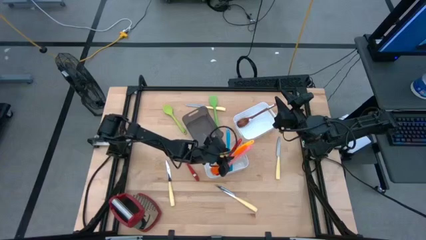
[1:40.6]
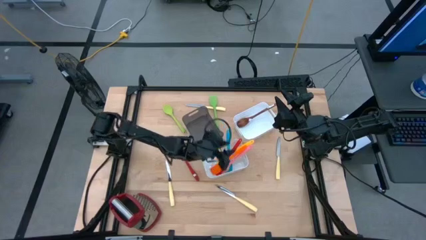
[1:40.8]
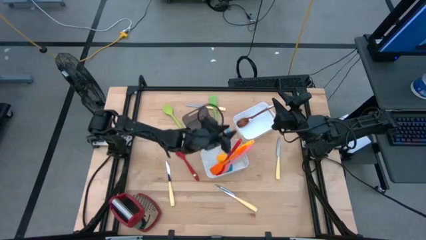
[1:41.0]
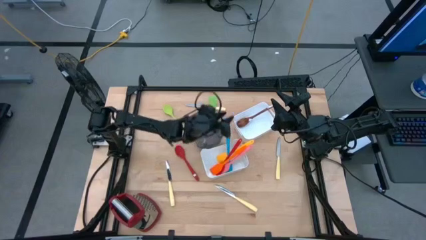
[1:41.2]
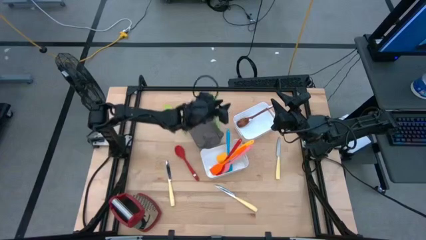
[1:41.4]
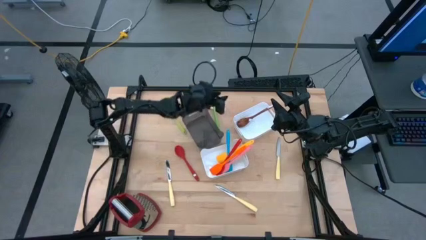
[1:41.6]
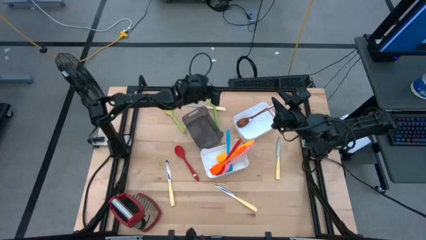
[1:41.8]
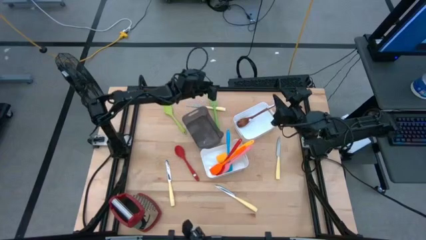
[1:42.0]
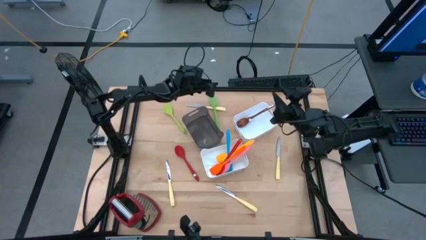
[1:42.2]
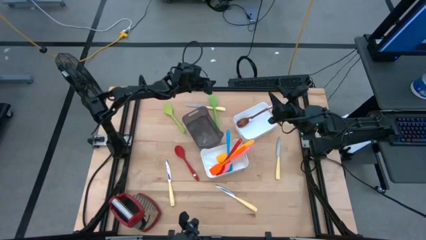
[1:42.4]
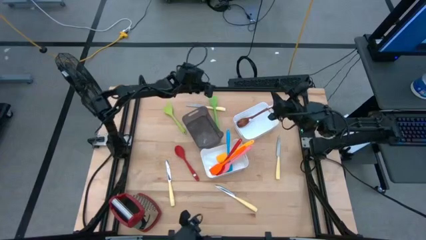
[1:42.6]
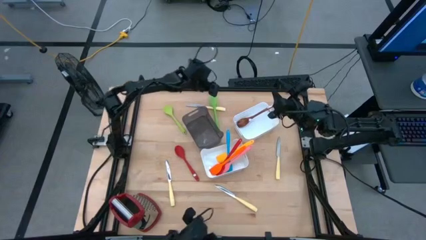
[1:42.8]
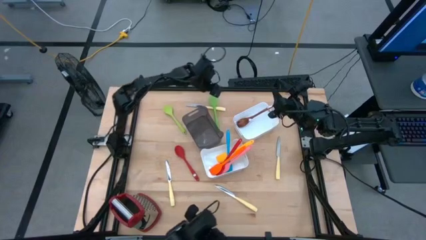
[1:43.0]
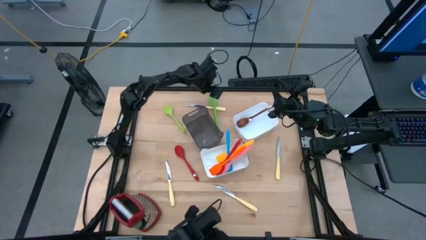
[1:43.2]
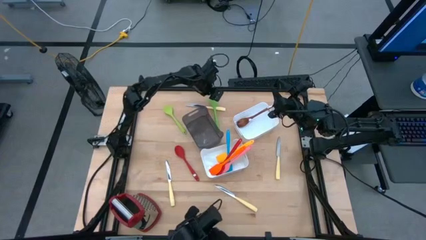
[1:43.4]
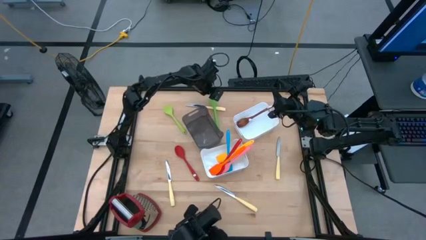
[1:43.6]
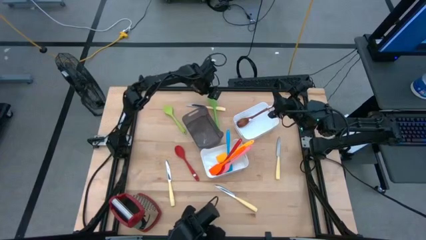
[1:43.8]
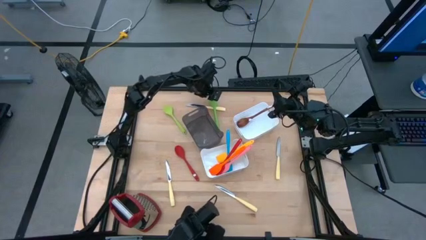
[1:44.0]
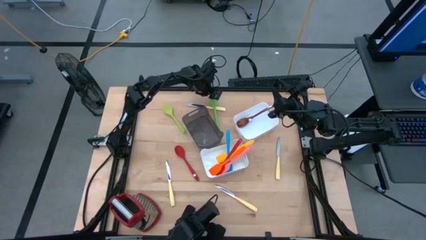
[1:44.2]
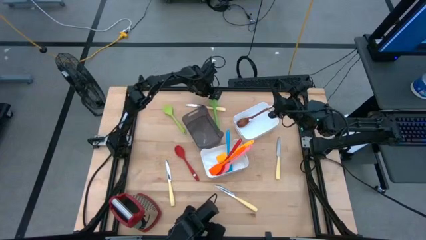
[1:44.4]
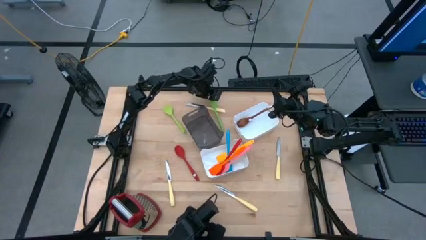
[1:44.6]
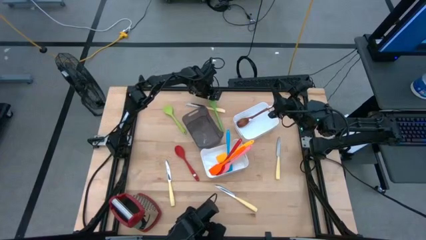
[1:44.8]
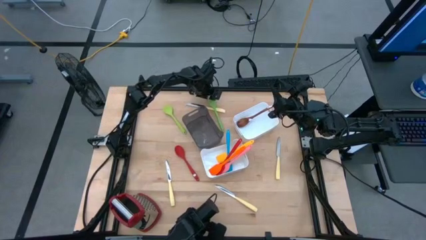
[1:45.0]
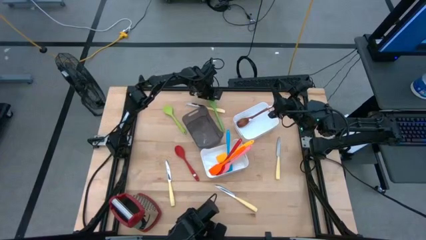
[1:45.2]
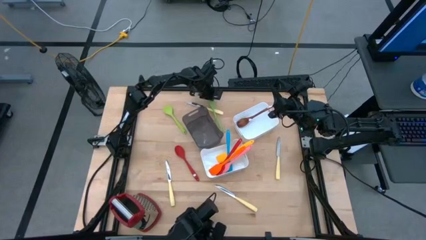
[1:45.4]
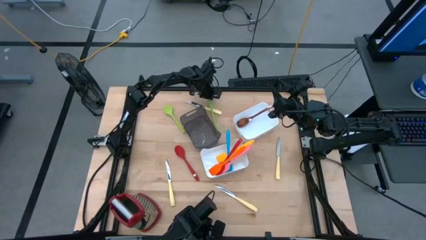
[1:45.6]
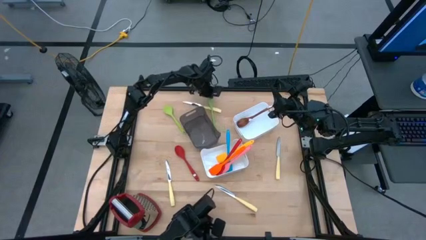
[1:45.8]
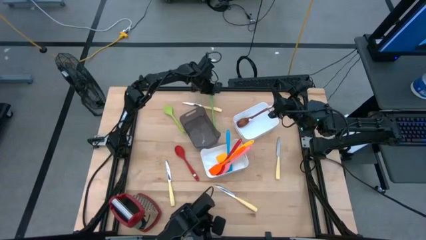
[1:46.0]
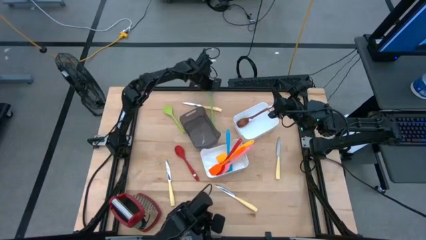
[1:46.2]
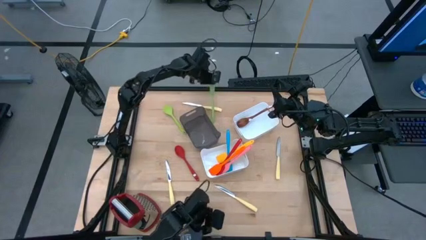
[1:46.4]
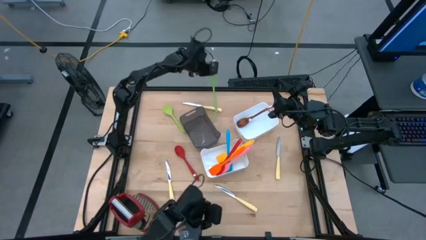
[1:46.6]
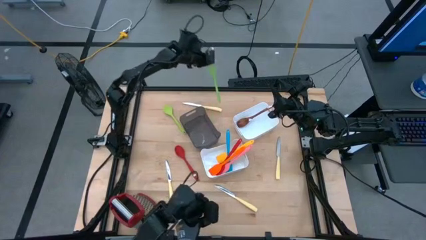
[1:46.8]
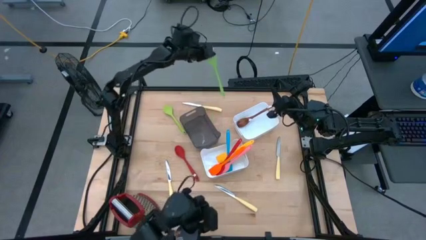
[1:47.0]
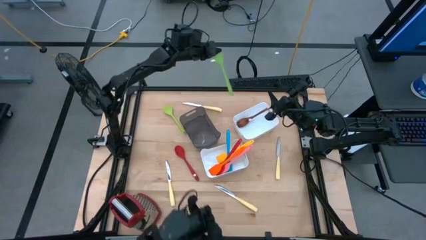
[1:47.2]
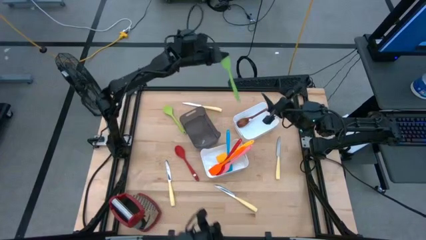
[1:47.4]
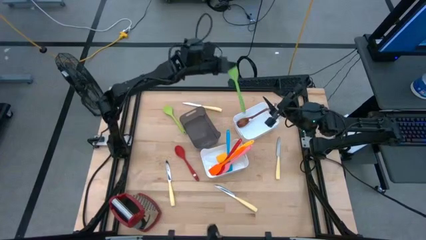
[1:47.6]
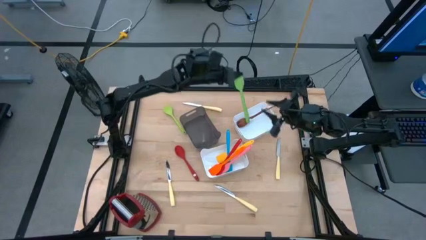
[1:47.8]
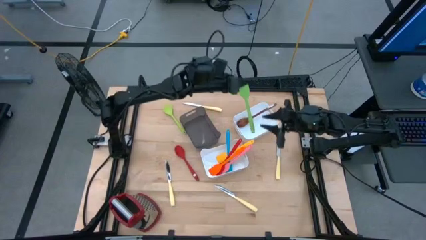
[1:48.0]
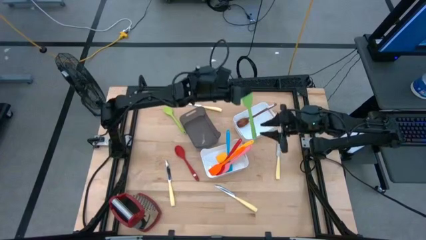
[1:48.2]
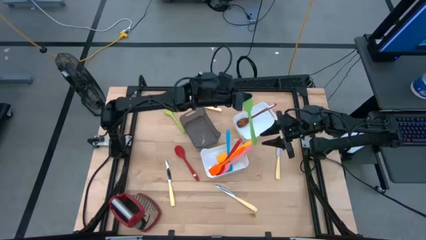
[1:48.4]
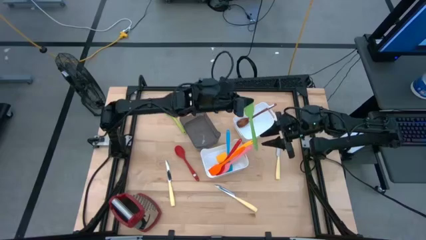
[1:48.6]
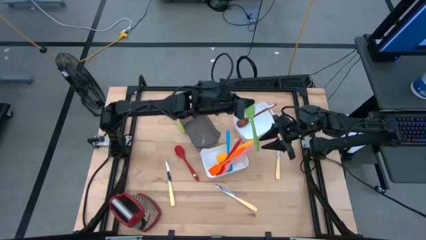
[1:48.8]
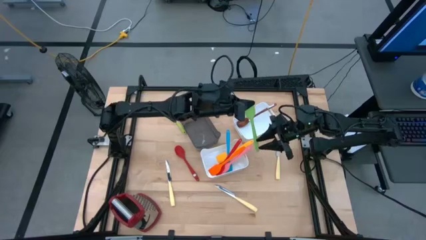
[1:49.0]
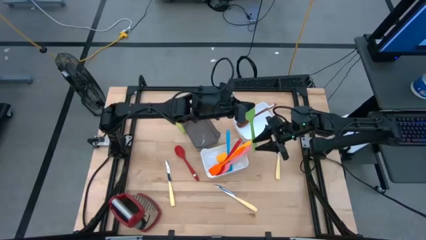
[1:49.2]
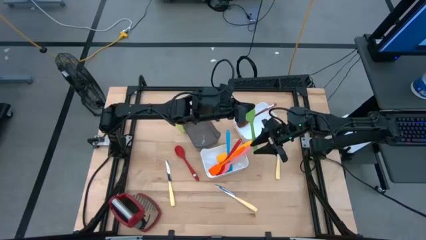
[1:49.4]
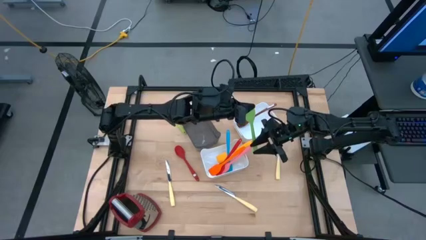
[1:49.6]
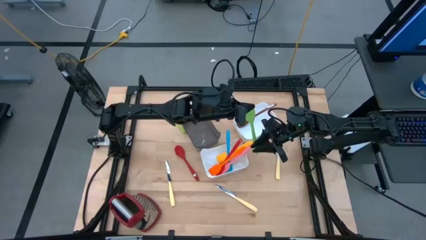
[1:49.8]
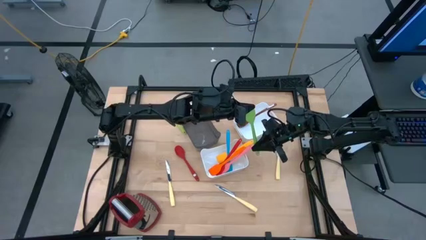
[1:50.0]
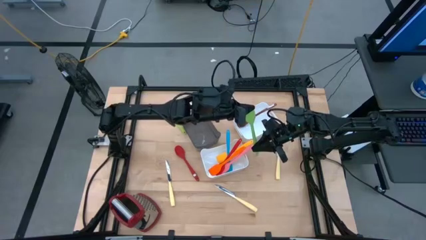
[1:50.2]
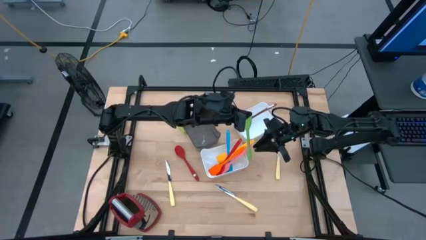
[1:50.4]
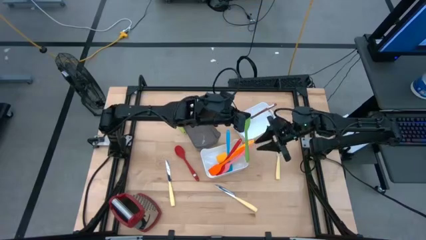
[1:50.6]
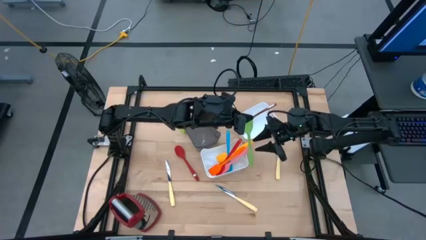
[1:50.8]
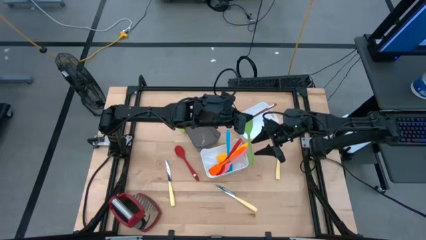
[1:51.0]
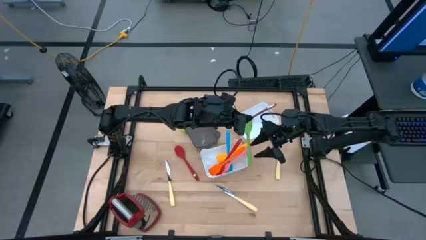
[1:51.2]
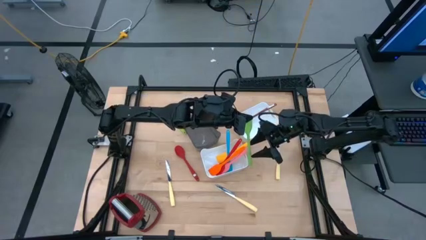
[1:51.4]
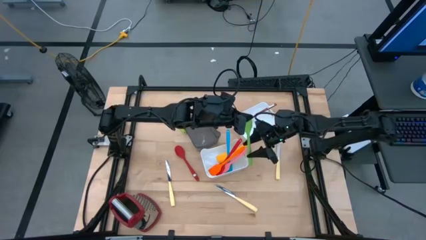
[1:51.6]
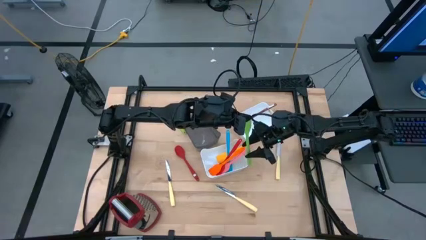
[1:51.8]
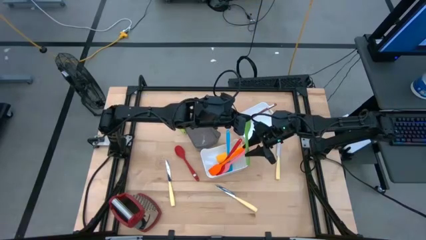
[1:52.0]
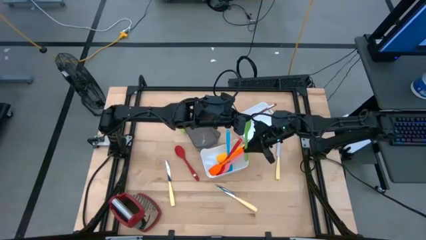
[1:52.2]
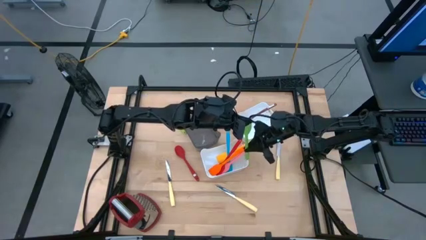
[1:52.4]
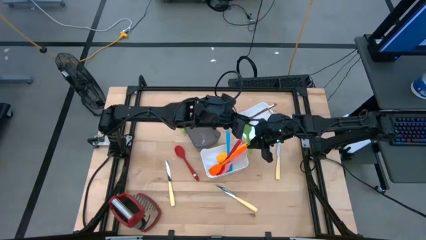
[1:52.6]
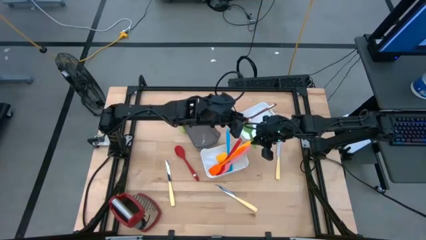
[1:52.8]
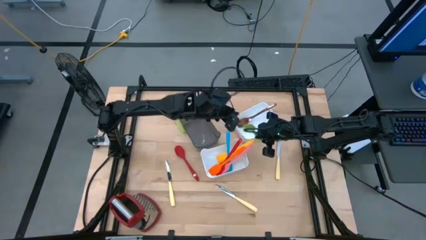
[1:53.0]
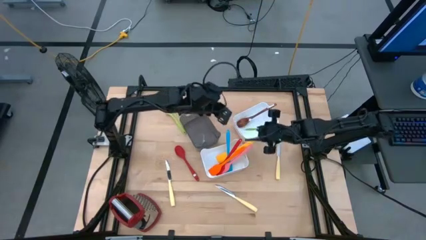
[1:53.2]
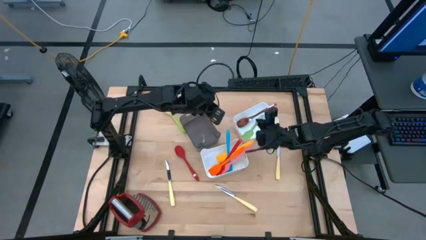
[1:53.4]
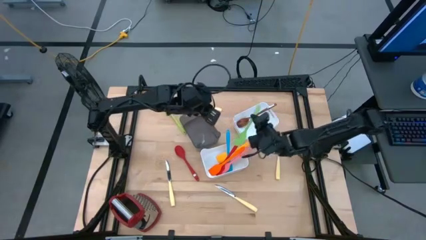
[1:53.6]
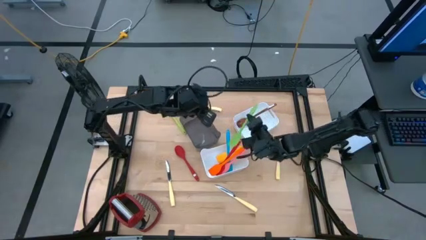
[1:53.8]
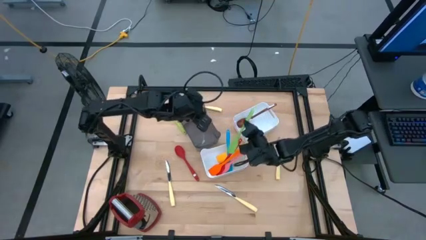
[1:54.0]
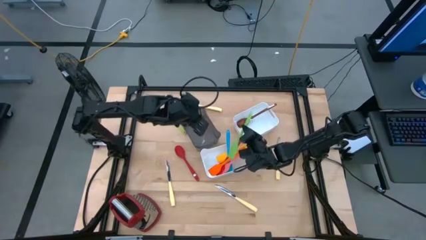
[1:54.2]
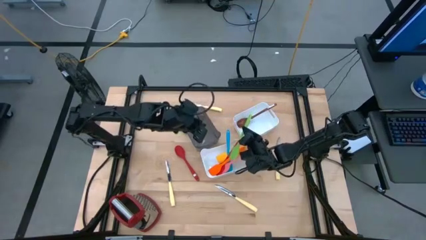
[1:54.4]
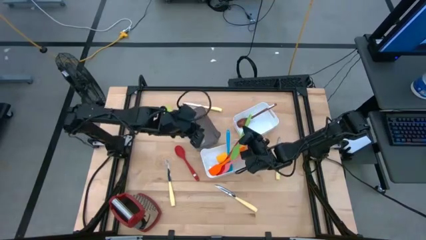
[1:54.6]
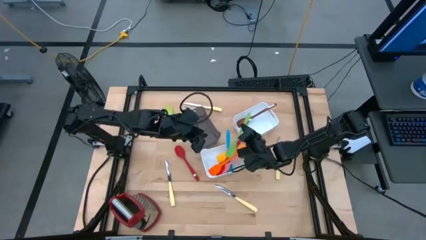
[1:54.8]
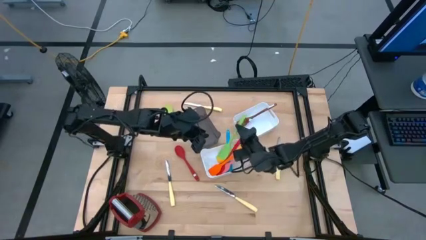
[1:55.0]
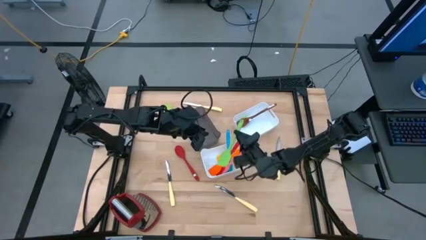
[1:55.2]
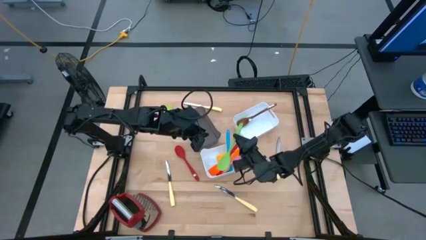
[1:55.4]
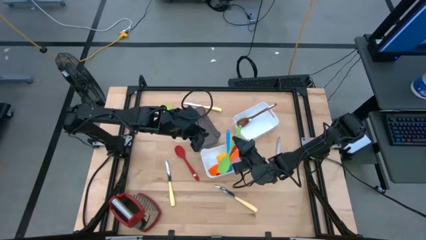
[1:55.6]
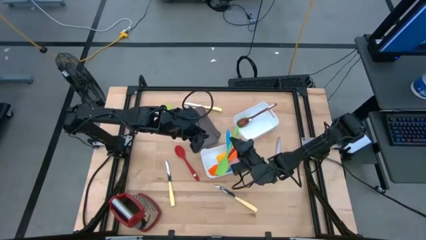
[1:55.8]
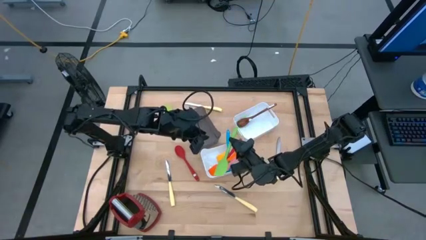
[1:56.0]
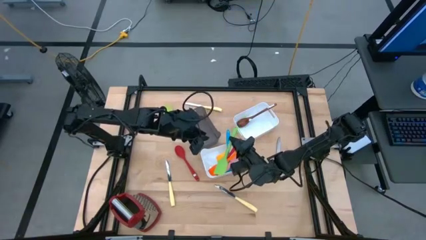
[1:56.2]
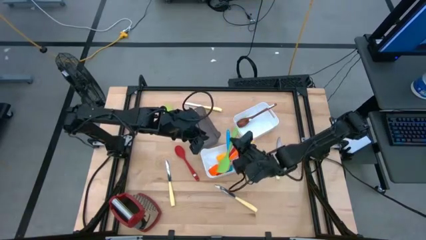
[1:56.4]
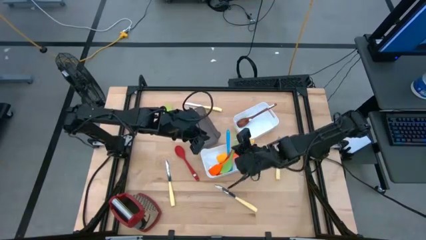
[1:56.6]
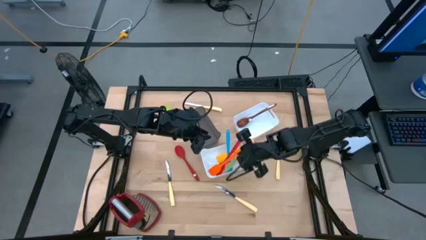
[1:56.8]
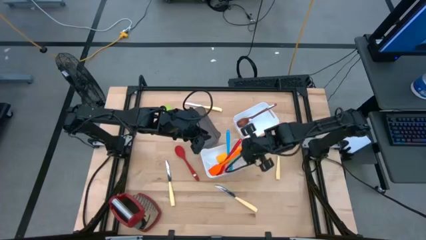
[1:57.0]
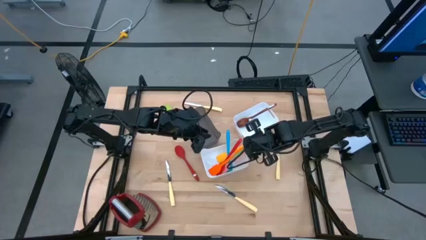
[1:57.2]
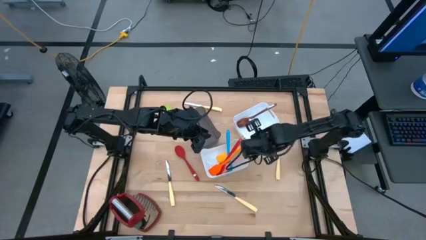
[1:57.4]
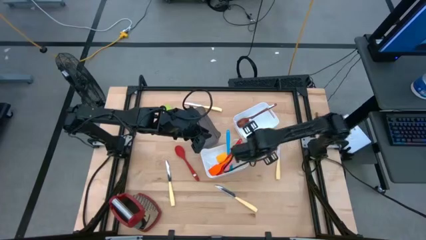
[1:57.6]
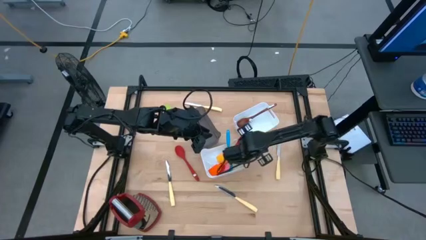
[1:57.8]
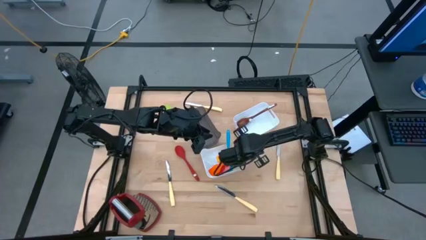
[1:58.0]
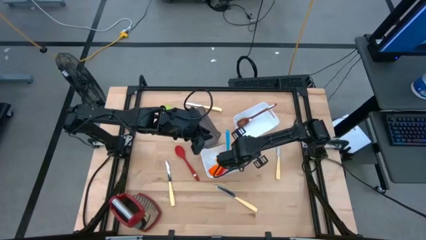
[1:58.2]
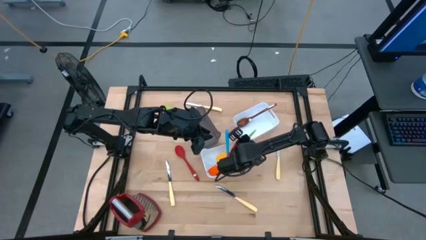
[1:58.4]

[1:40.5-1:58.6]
Task: Pick & Place Kitchen Items
Put the green spatula into the bottom white bin
